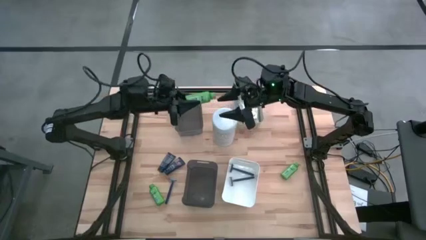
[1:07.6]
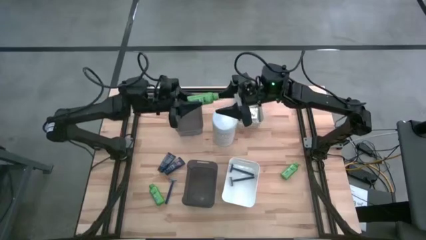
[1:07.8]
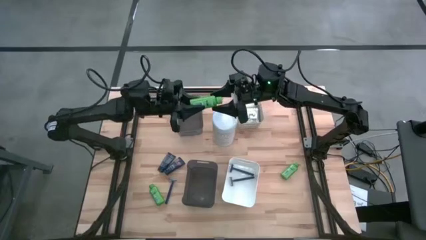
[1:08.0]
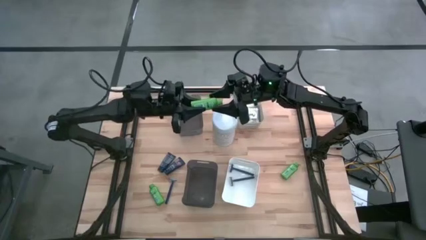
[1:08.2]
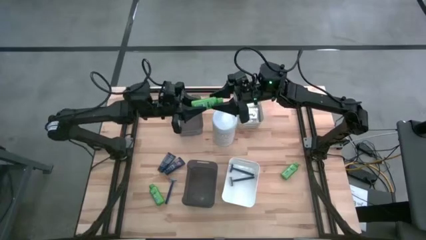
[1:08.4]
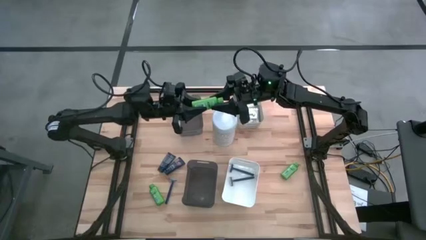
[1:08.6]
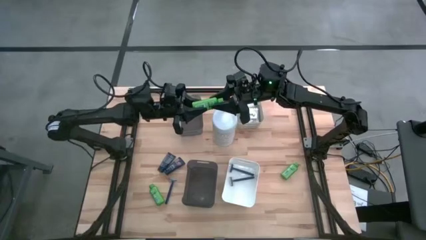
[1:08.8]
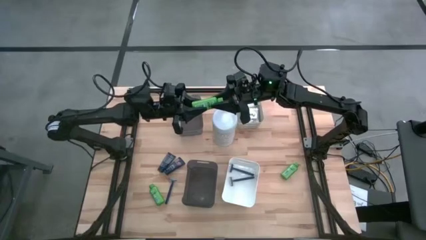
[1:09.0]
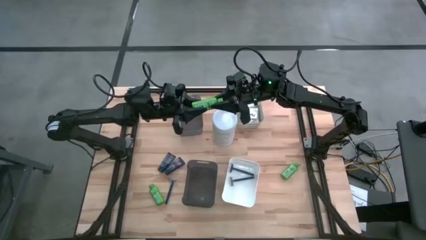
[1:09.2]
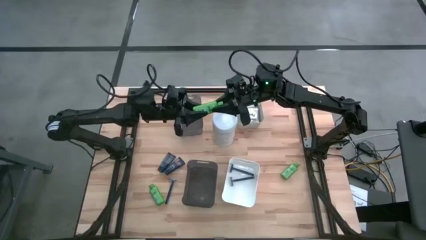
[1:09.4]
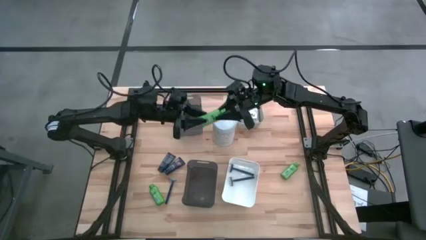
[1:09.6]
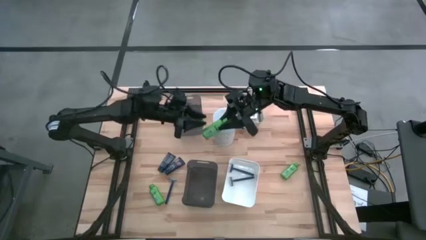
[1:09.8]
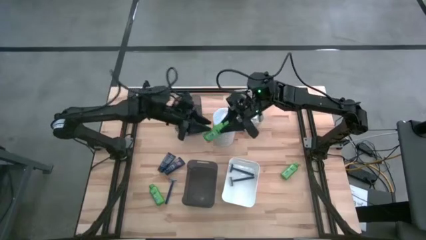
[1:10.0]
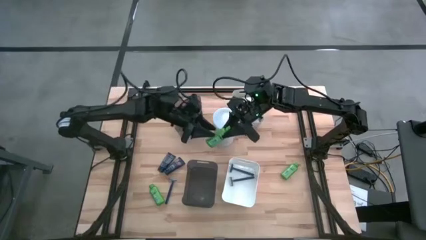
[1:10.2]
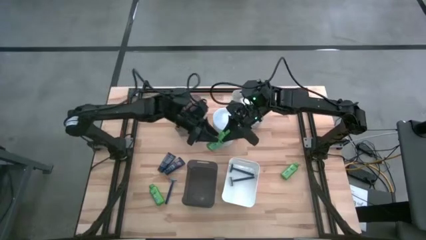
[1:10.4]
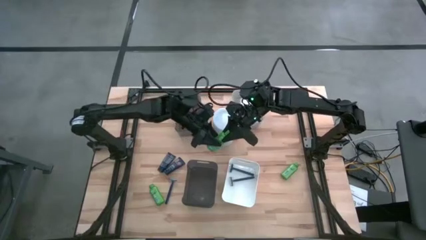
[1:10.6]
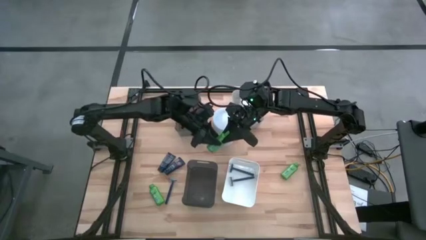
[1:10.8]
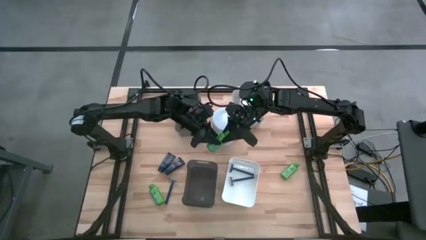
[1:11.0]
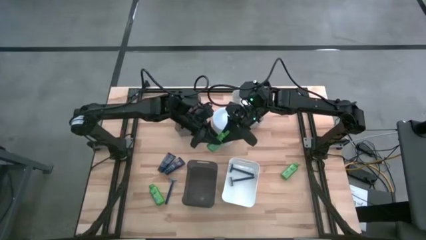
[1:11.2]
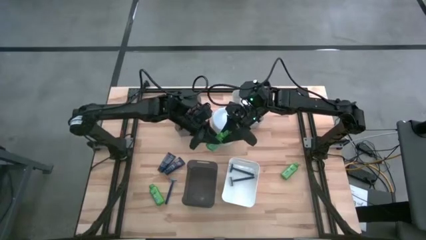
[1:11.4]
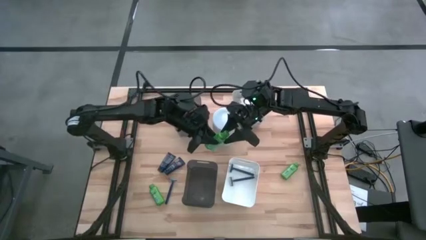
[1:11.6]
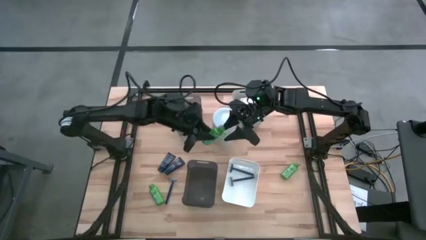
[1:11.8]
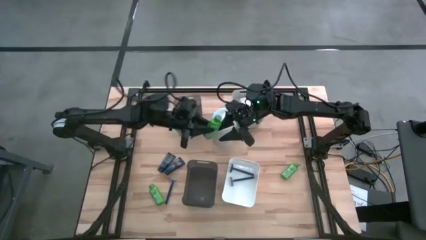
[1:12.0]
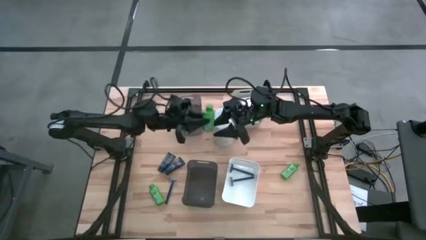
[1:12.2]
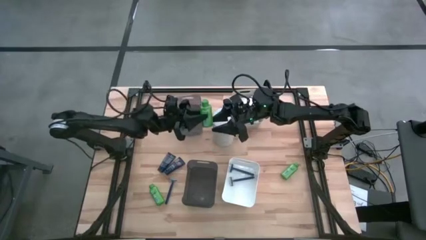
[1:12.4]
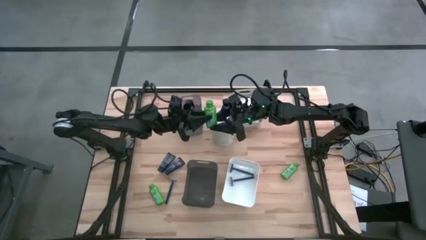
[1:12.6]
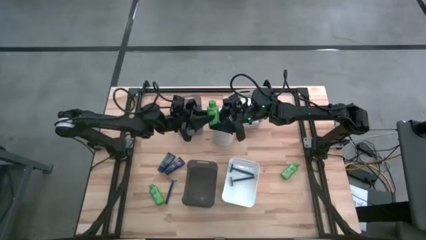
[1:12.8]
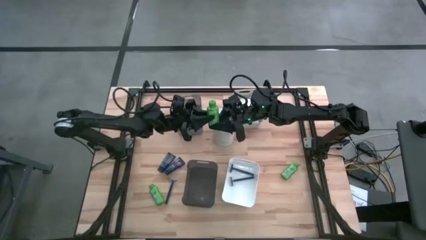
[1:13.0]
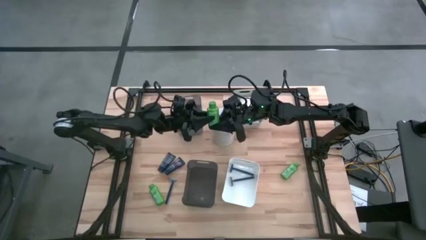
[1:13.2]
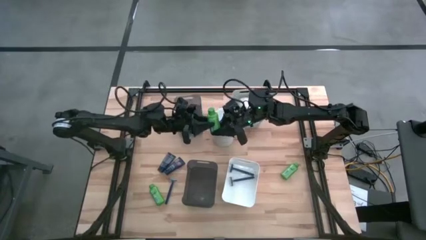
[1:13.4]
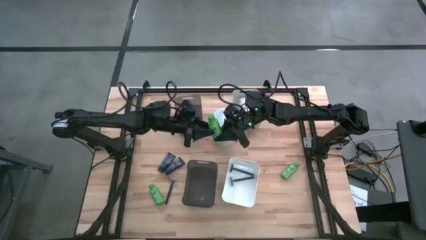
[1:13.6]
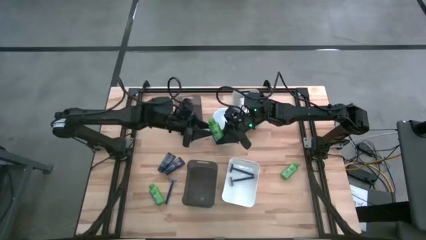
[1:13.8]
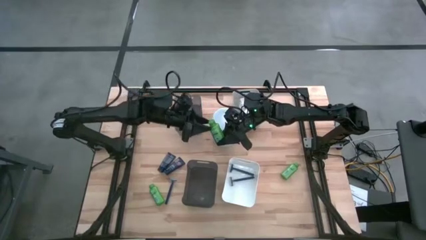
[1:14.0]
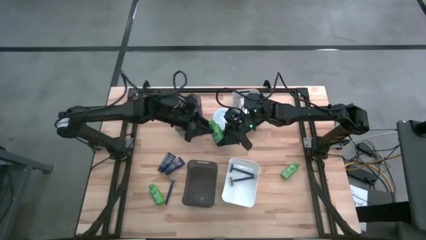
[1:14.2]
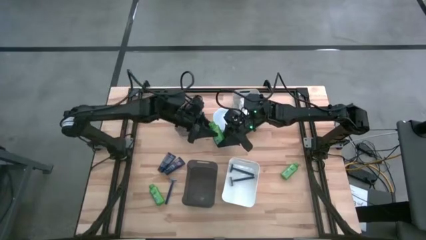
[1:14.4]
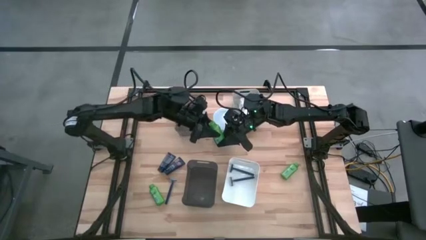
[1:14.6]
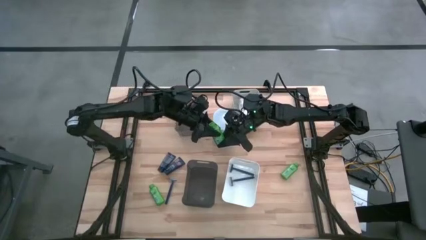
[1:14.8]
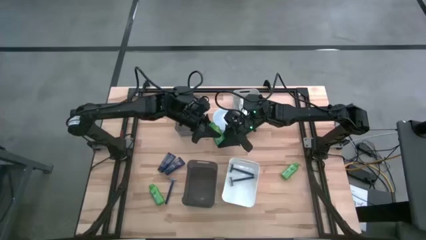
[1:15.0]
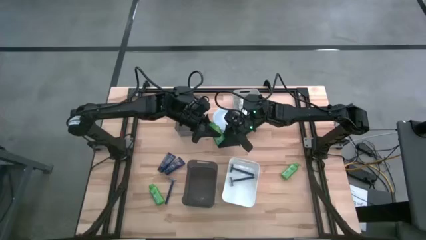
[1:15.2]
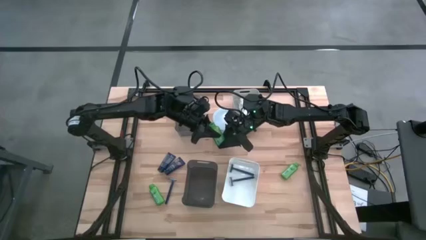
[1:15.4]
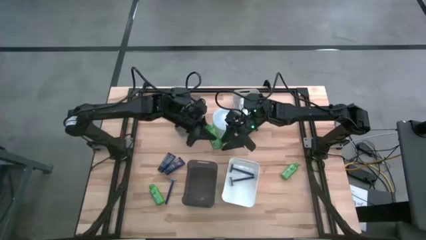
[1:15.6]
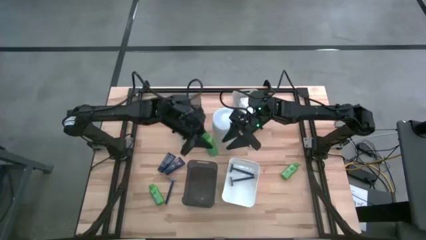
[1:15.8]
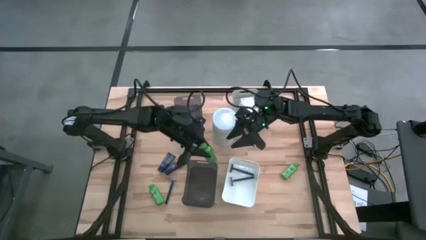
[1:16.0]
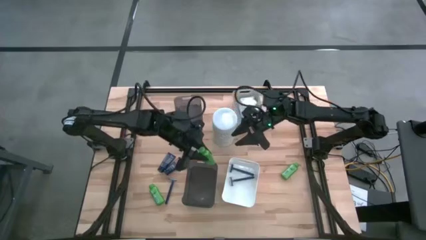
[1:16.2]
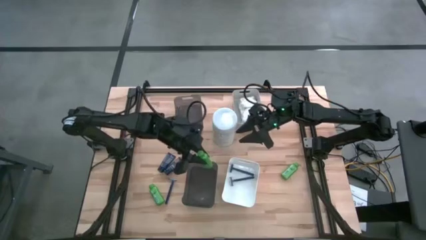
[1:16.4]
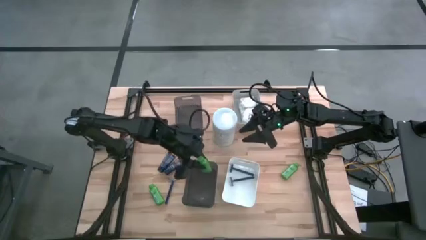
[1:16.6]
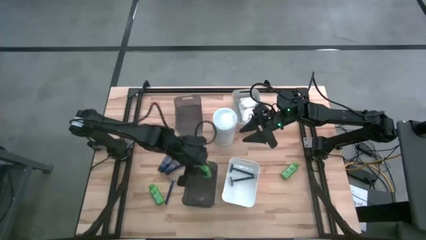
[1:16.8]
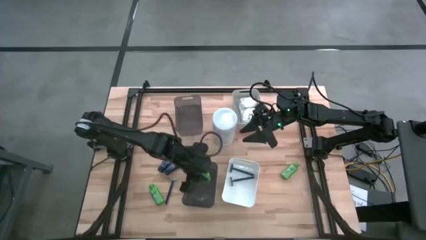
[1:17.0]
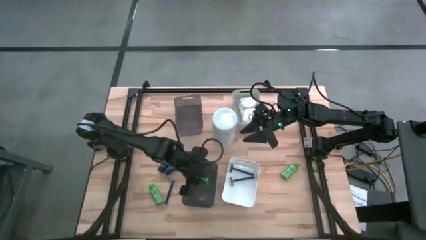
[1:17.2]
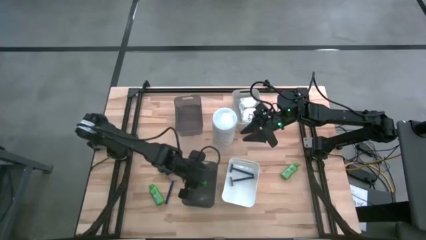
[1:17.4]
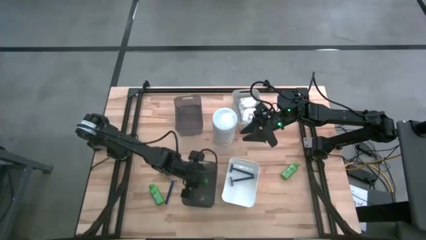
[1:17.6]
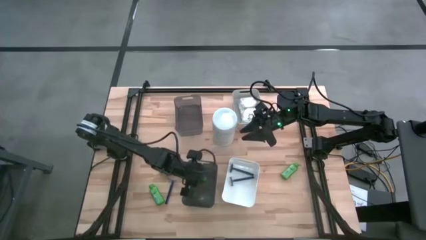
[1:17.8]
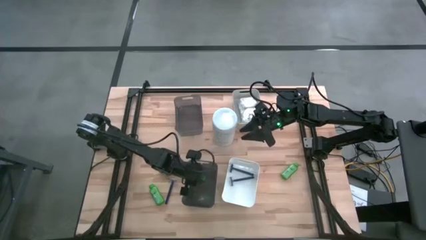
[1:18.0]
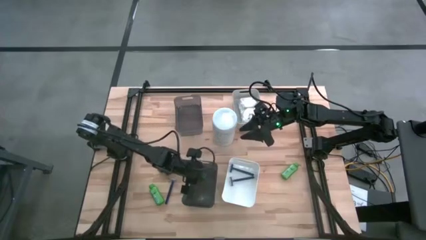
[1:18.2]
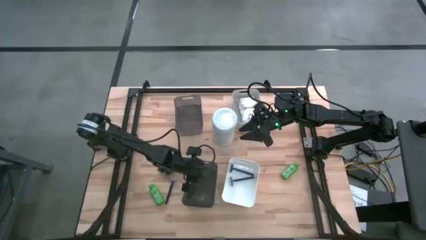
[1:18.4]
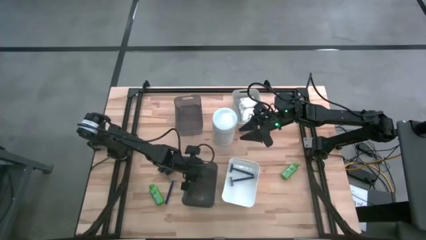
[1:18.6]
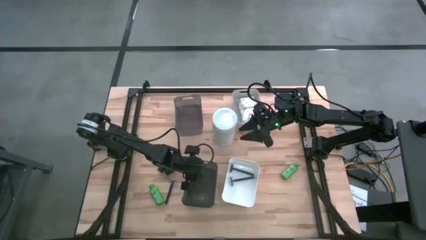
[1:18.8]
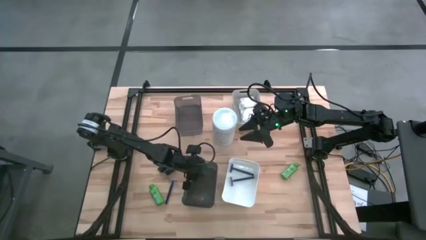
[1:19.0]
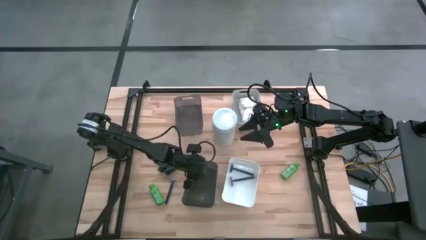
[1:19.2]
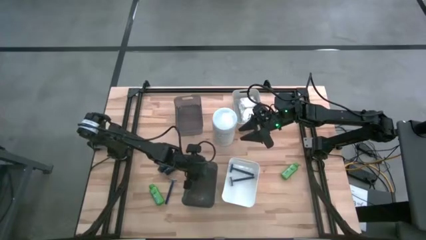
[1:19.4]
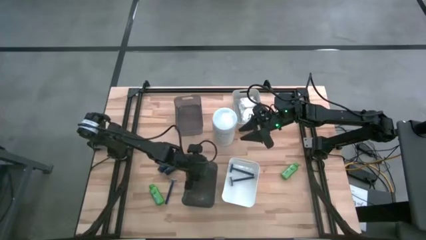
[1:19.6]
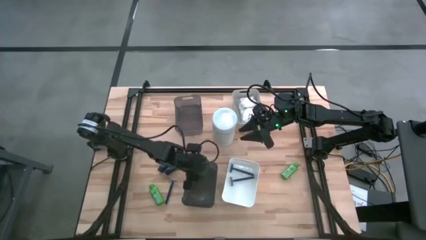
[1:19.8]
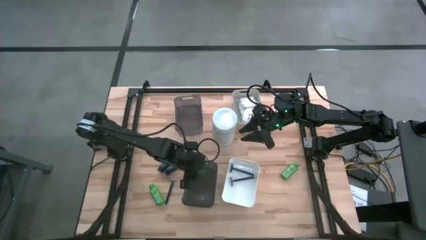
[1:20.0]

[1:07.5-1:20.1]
Task: Pick & Place Travel size toiletries
Put the green shampoo bottle into the bottom black bin

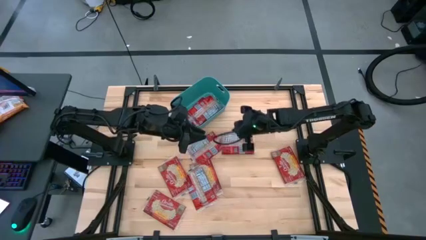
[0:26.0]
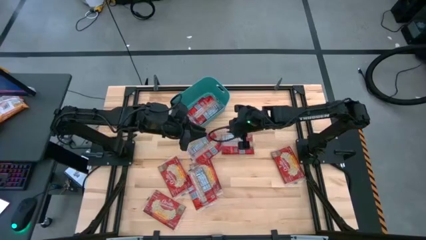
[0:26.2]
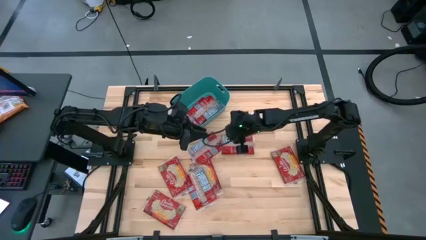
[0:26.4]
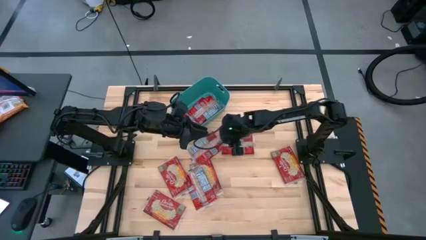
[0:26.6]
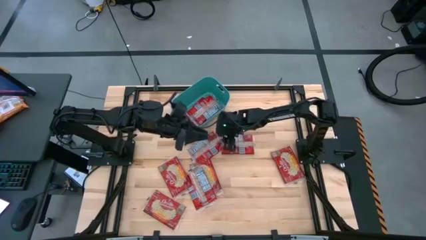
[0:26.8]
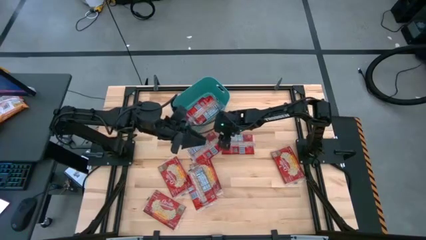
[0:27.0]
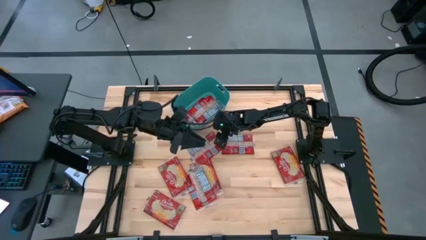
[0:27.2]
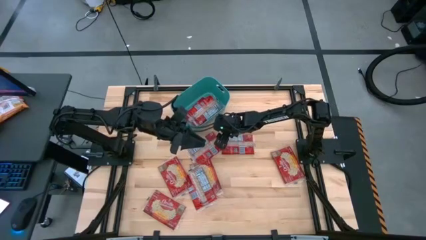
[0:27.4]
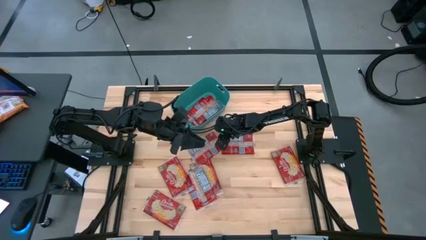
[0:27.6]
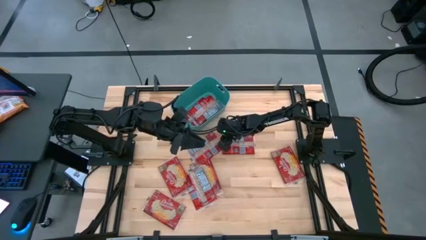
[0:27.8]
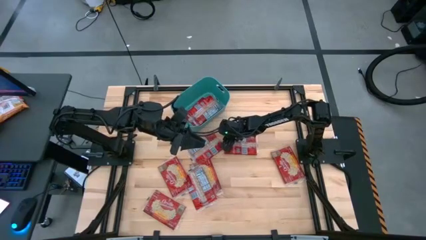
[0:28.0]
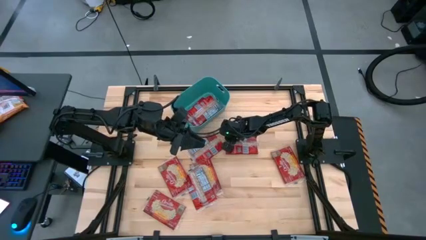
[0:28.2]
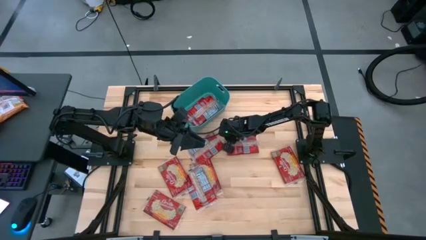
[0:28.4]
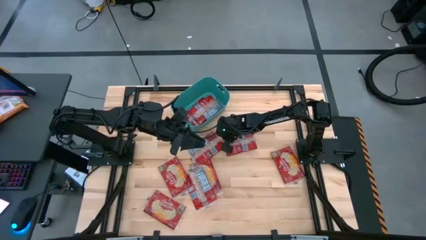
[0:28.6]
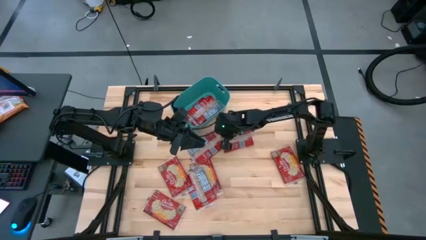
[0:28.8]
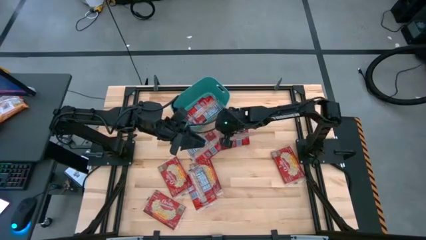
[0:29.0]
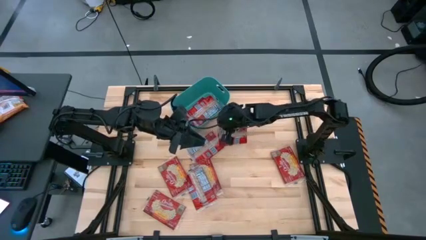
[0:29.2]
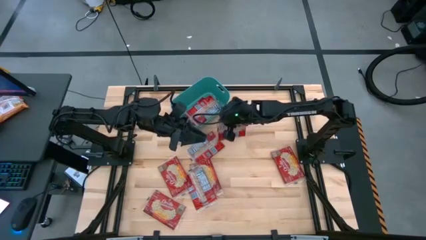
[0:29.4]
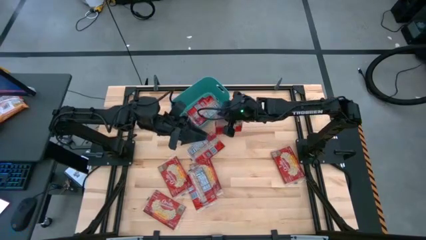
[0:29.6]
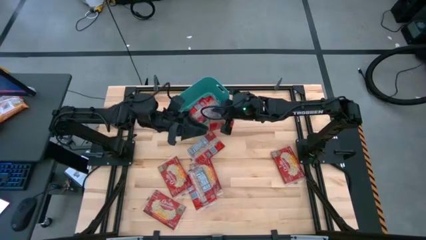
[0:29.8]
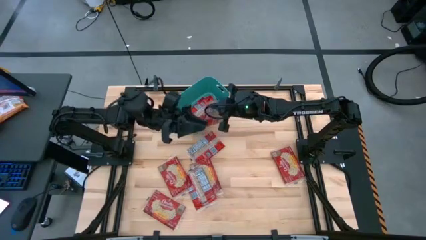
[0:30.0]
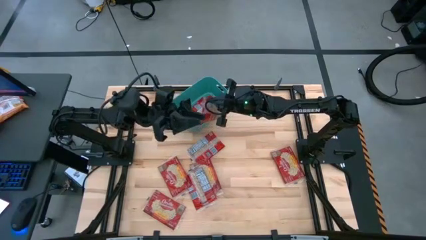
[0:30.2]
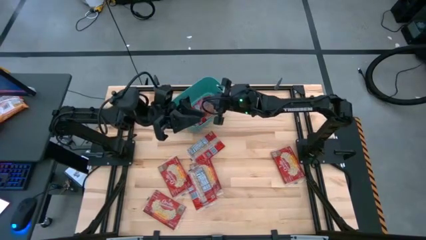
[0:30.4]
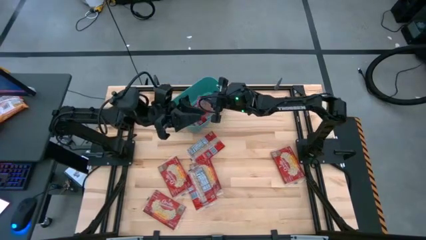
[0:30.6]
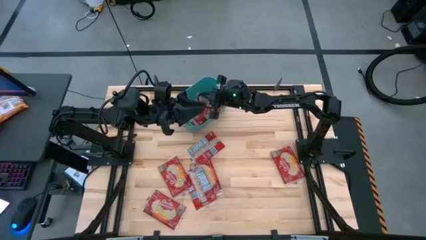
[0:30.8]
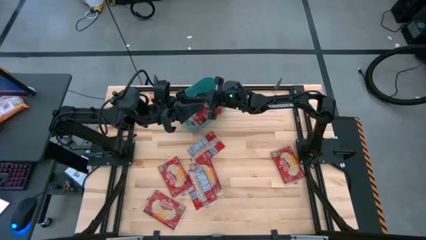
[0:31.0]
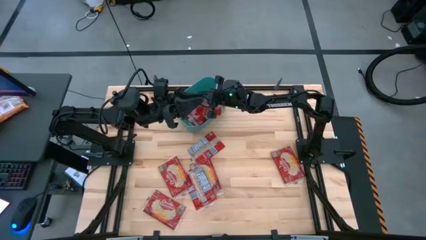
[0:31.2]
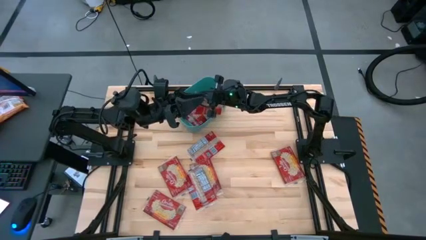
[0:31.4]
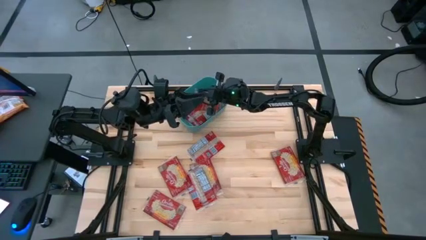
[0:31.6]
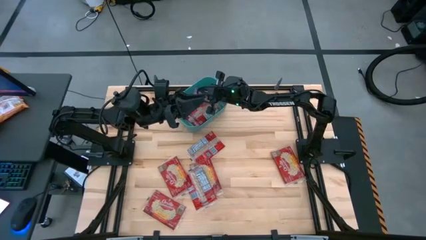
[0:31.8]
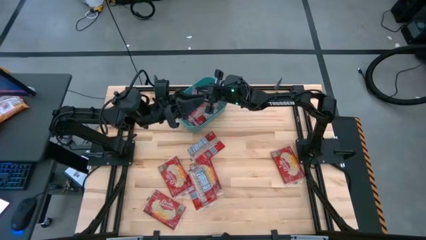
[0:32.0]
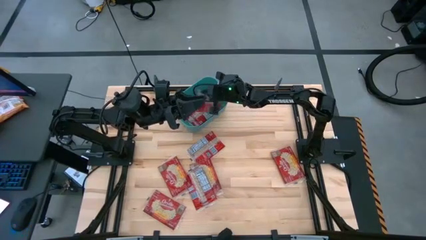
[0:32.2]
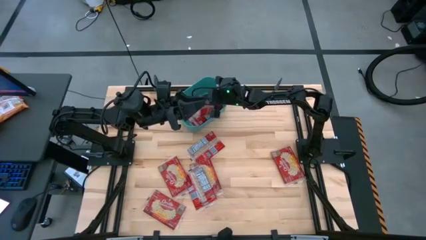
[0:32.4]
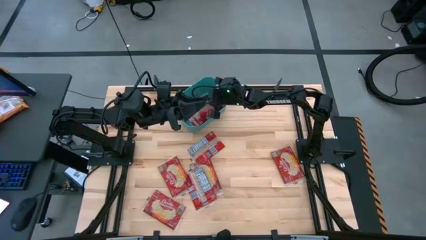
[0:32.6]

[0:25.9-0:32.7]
Task: Sort popcorn bags into baskets
Put the red popcorn bag into the blue bin
